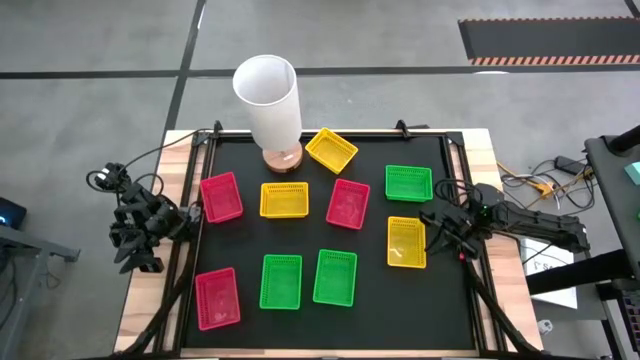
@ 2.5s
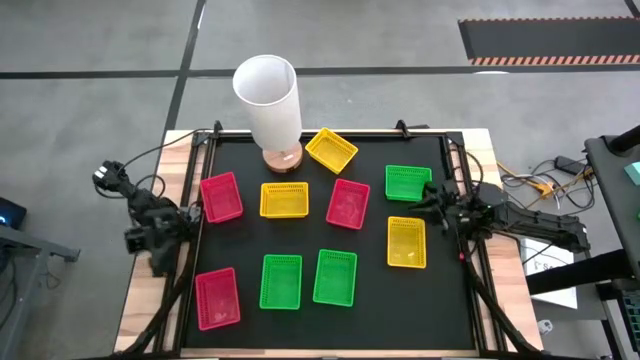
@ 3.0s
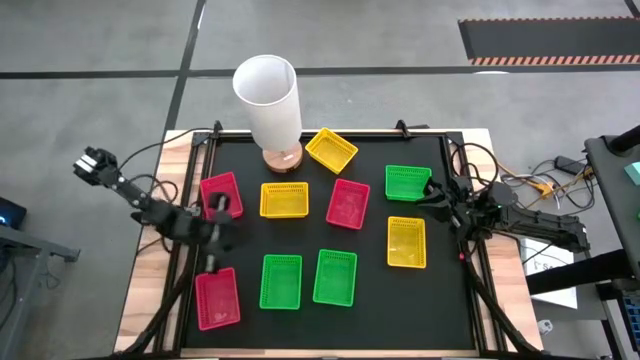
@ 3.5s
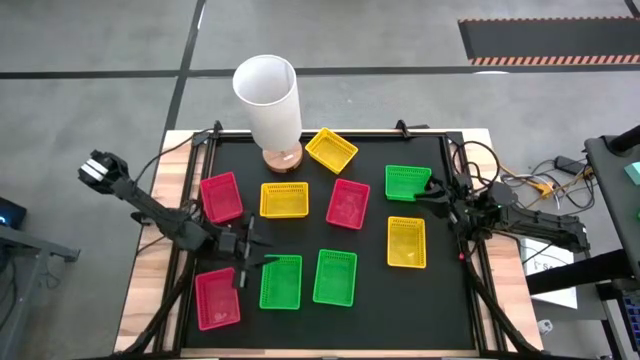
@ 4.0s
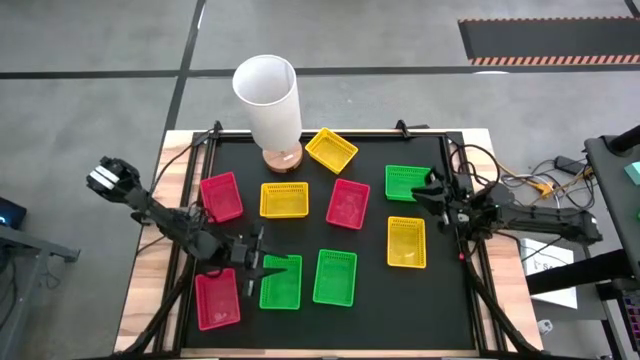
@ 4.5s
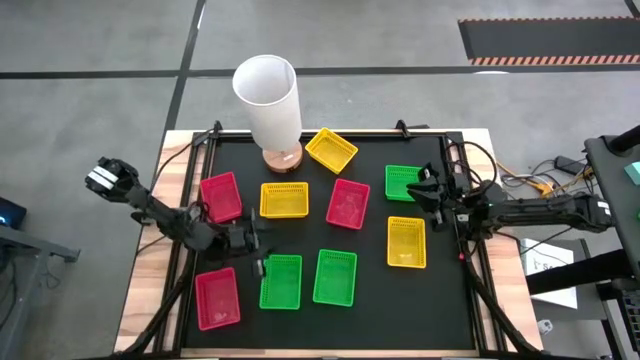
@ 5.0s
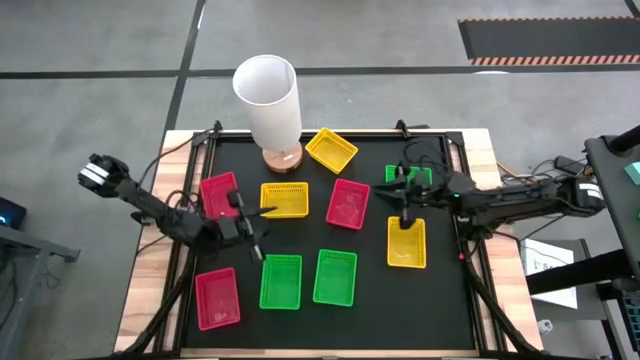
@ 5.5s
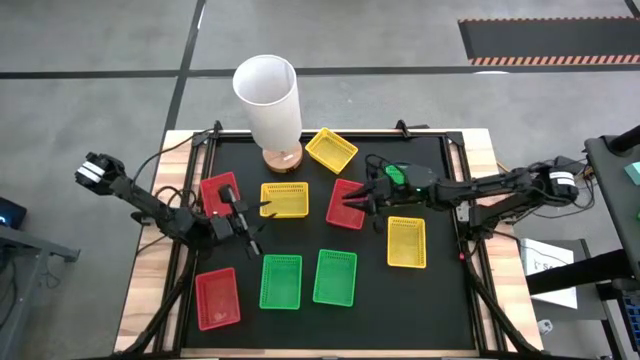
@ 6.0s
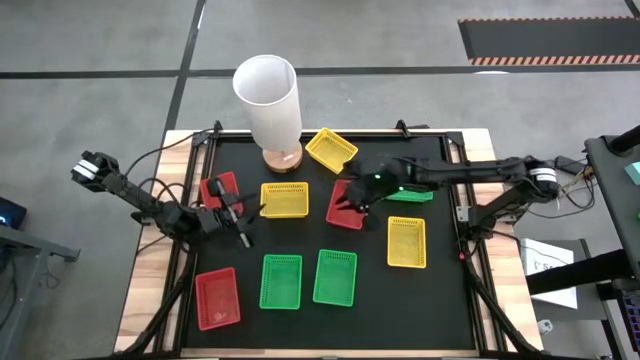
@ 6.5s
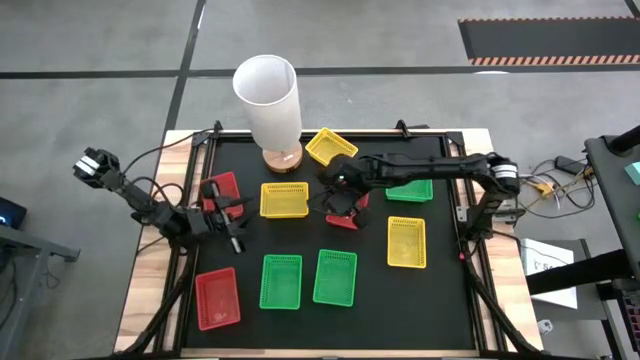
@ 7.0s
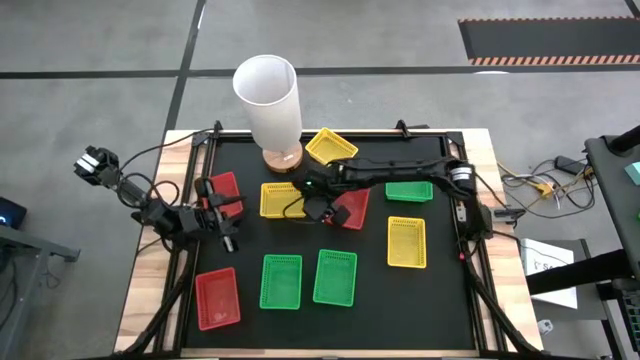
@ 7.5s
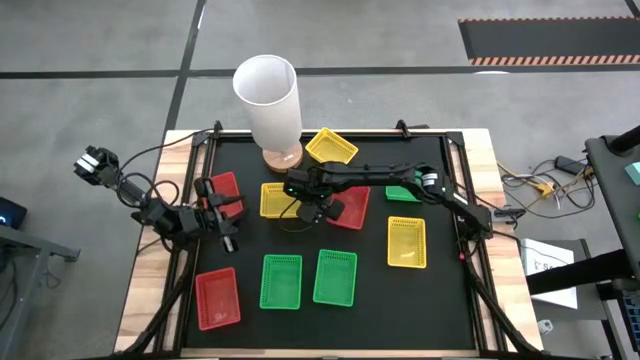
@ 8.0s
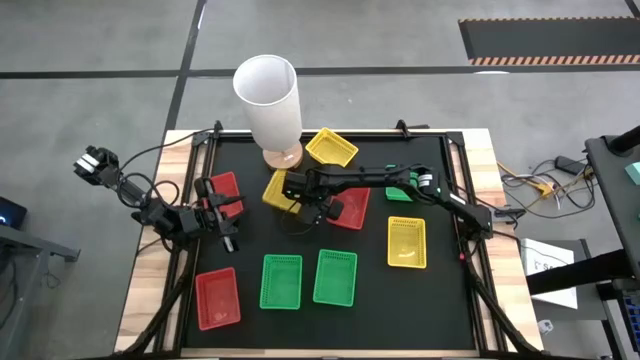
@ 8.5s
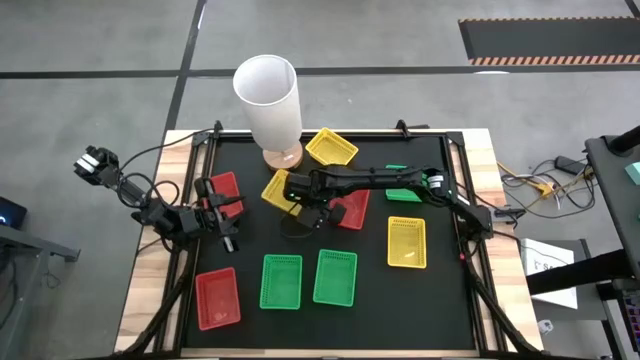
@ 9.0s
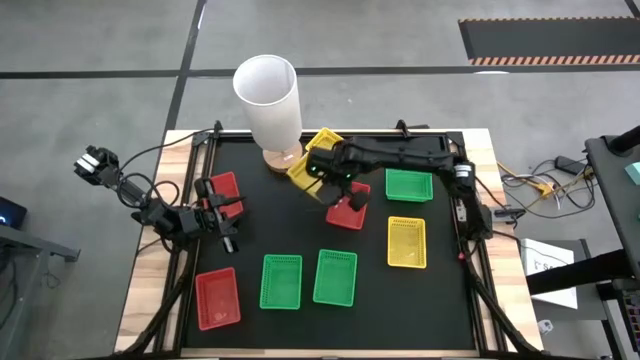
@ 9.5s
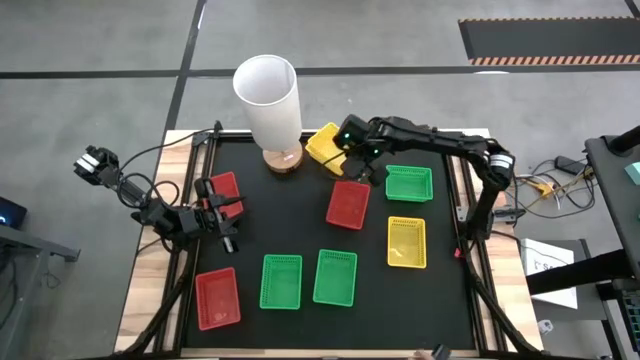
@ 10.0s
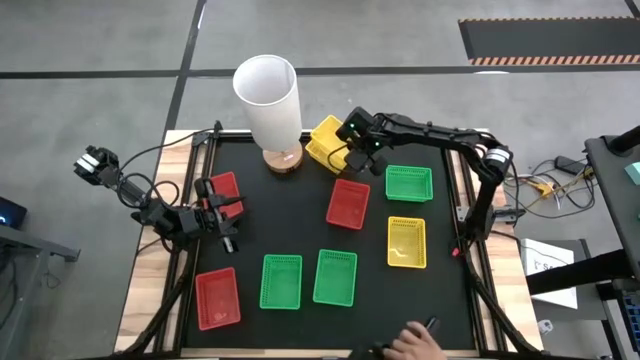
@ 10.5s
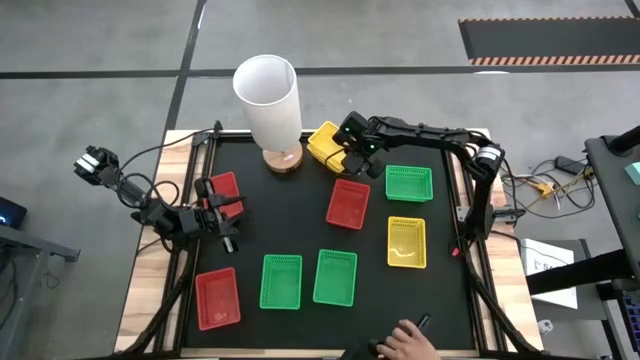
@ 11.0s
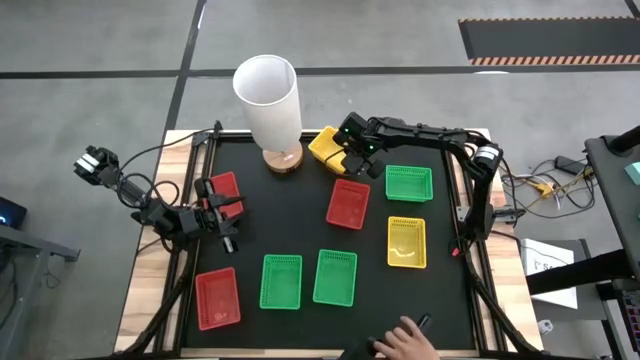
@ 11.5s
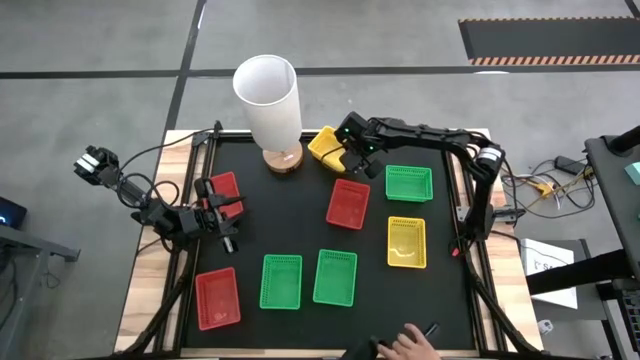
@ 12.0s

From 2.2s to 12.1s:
Stack the middle left yellow bin on the top yellow bin

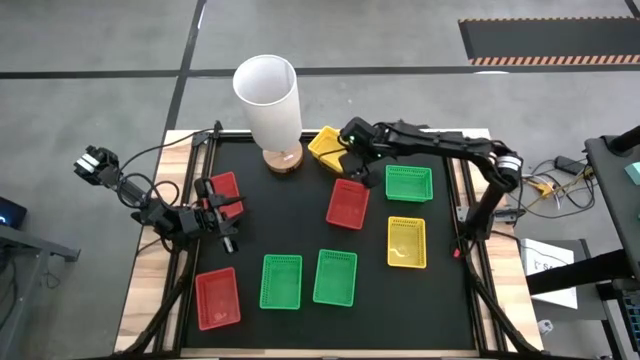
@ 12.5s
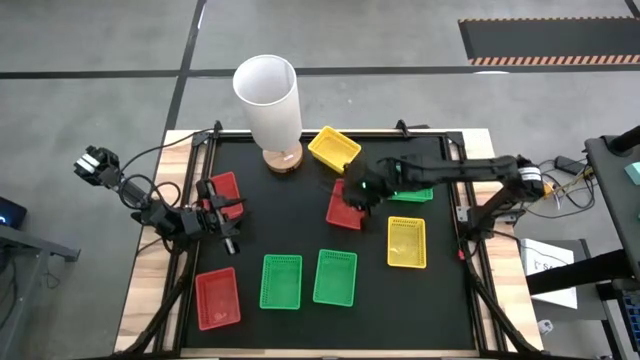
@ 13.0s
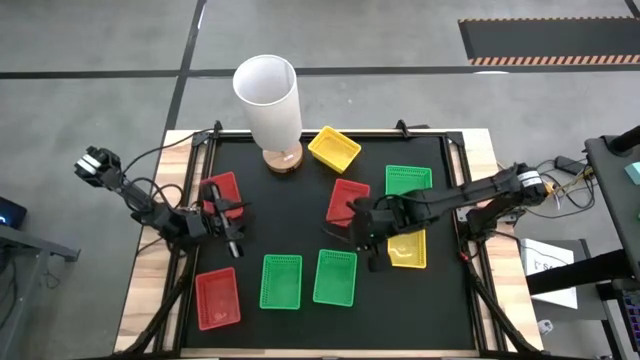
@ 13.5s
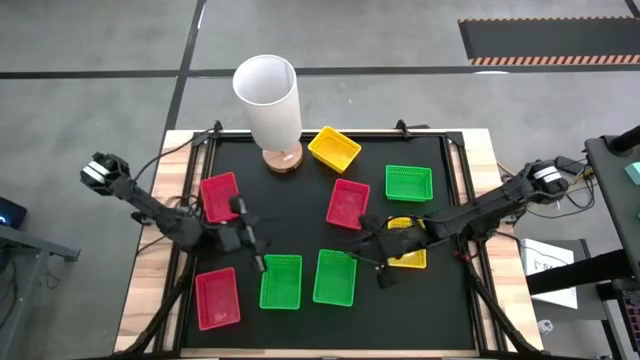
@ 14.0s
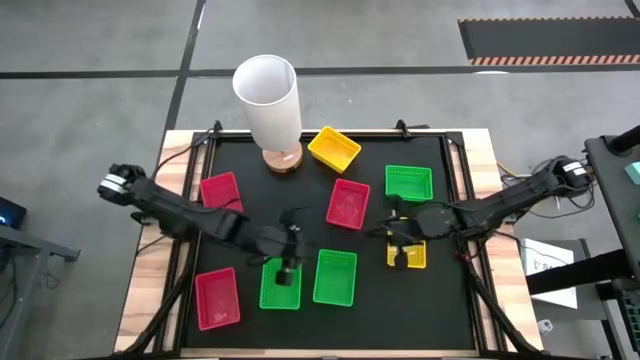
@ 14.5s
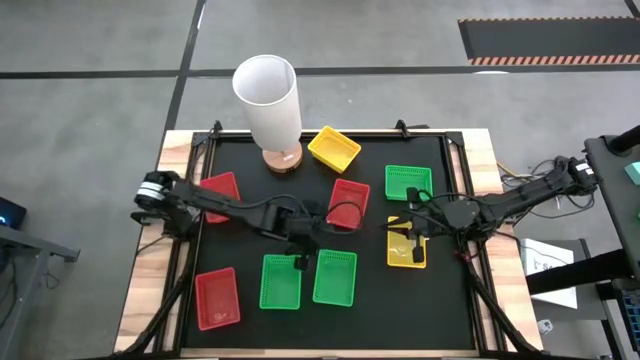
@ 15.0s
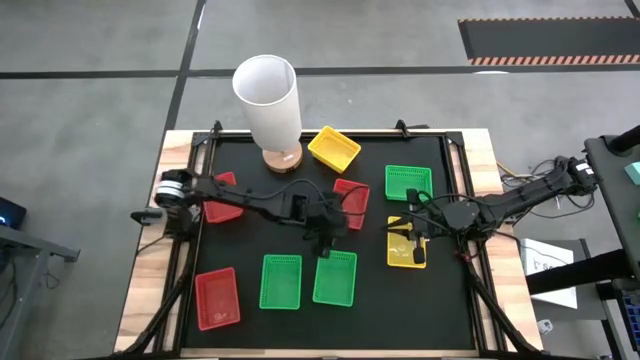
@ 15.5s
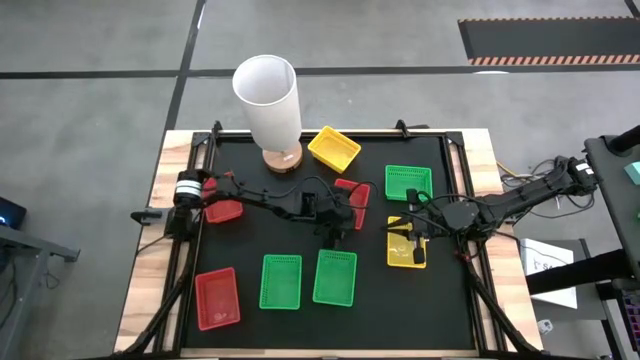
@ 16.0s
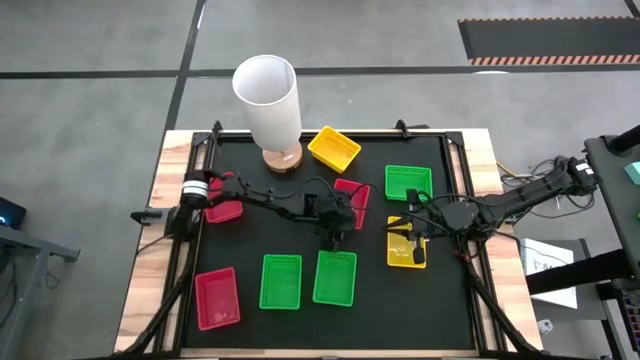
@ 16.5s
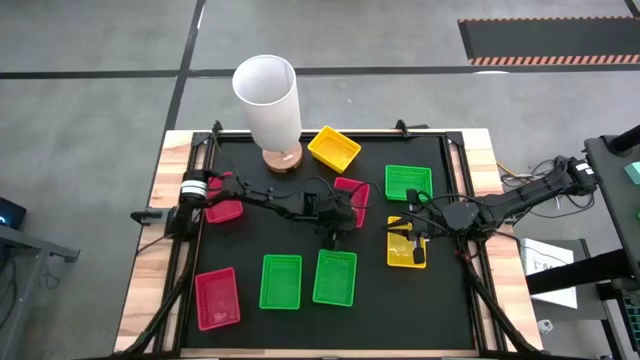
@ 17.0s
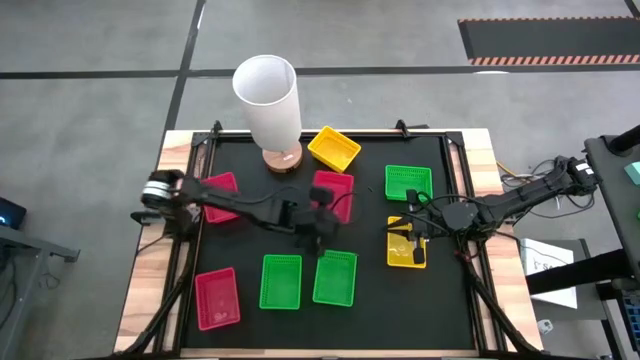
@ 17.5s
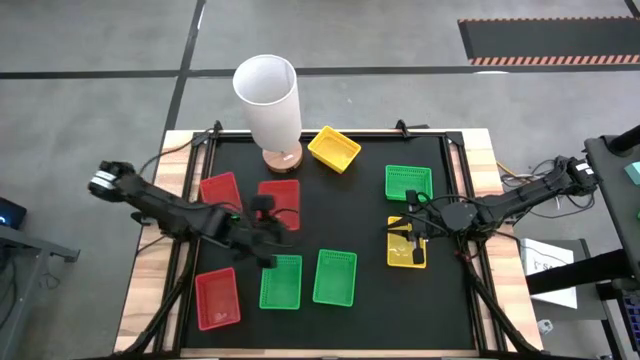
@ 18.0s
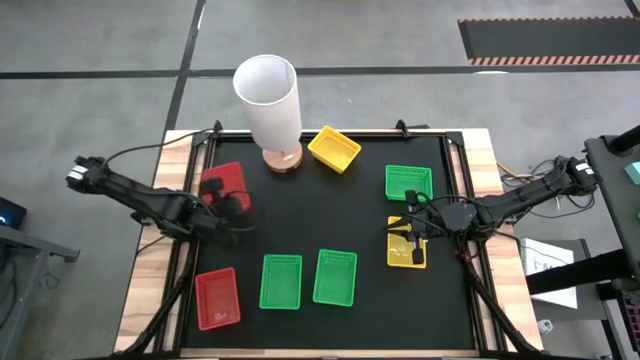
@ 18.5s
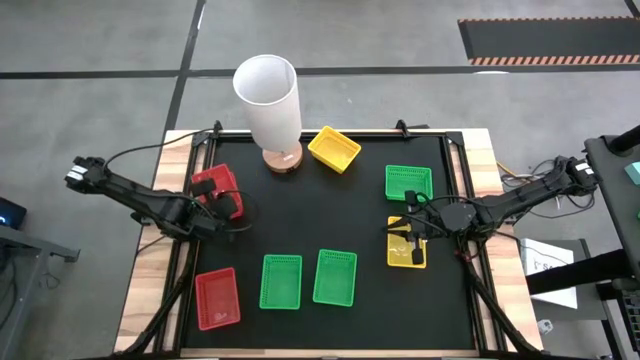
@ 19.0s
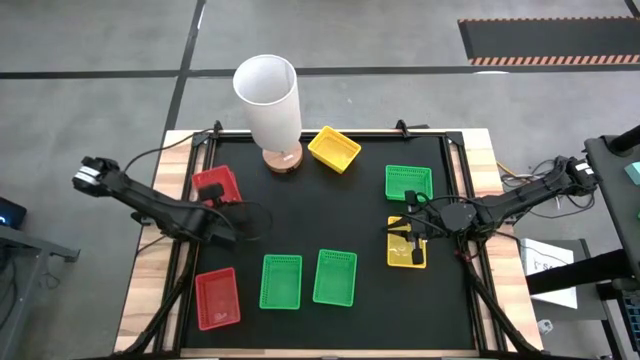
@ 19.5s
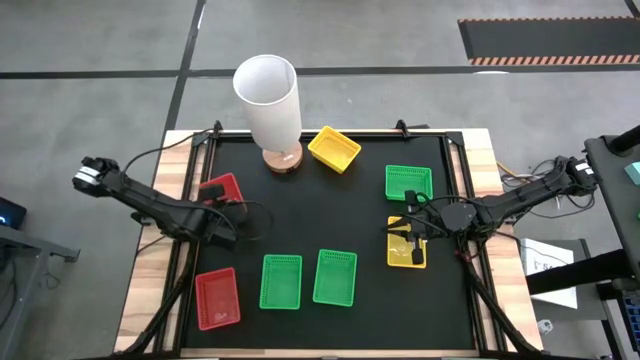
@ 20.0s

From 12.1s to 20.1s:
Stack the top right red bin on the top left red bin

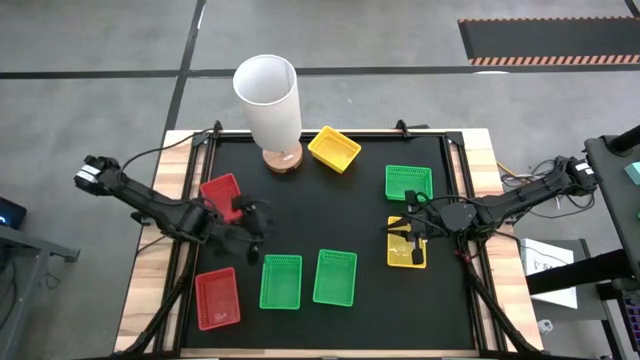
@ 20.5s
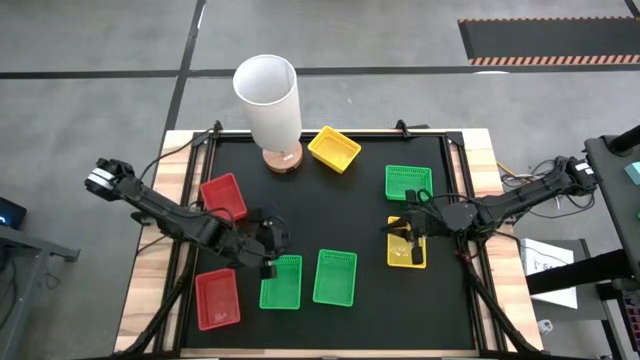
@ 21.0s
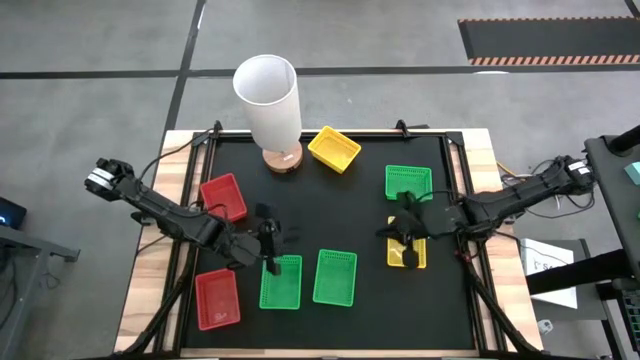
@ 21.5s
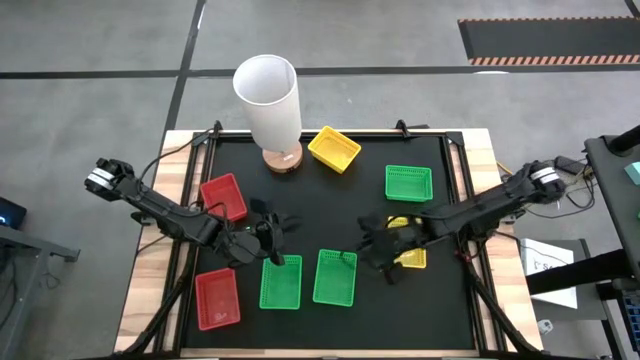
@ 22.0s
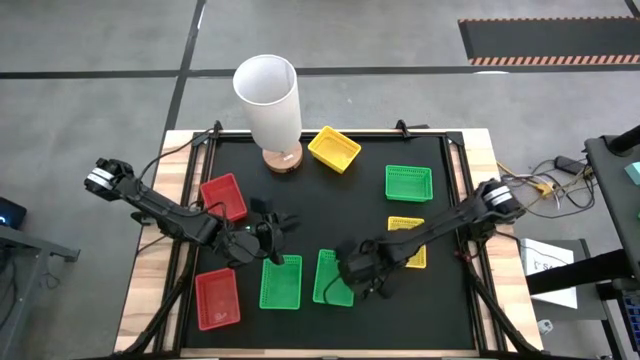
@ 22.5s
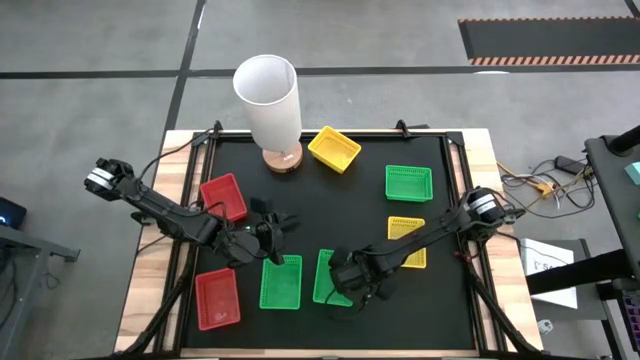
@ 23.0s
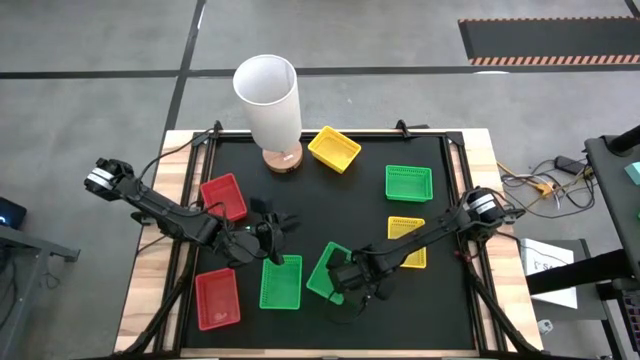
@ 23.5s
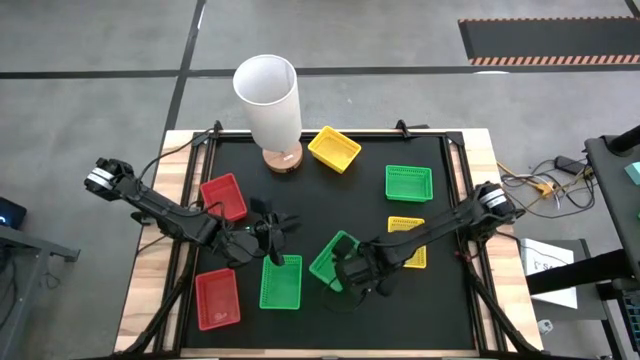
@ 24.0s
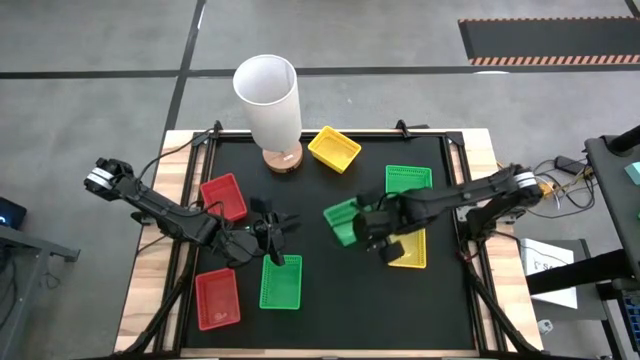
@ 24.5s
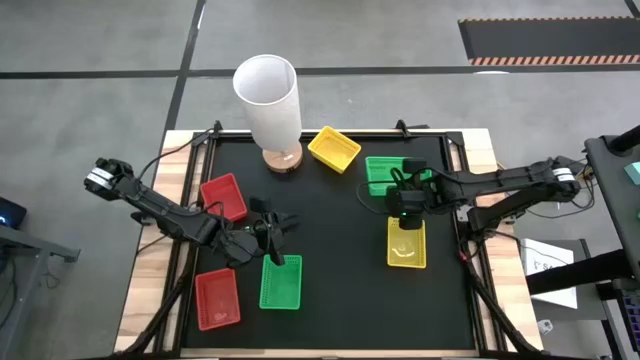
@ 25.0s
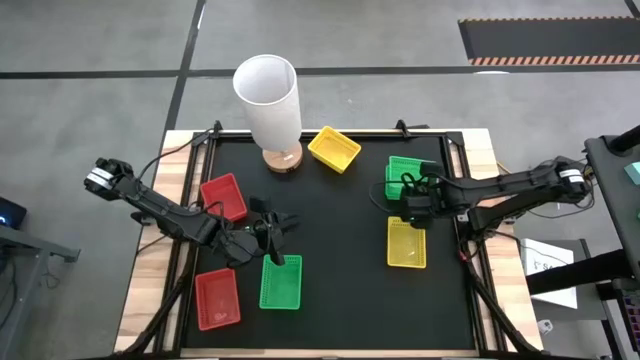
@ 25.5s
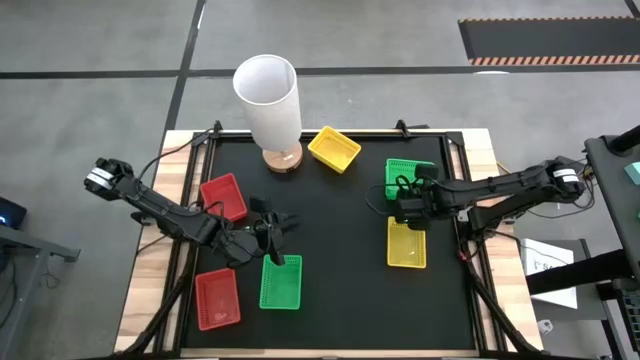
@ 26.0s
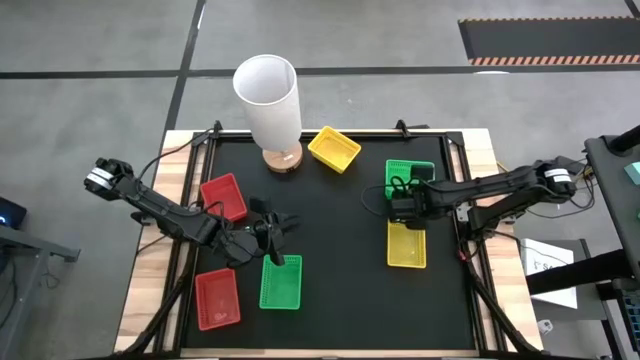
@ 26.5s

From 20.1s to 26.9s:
Stack the bottom right green bin on the top right green bin
